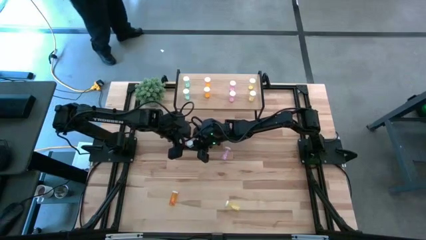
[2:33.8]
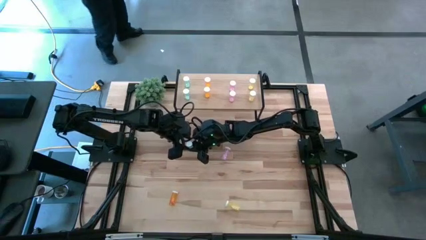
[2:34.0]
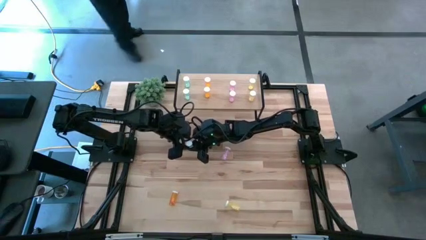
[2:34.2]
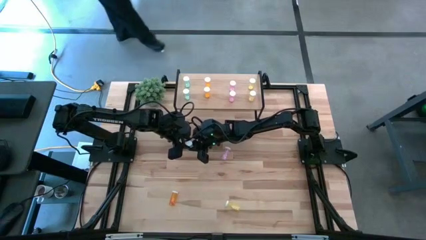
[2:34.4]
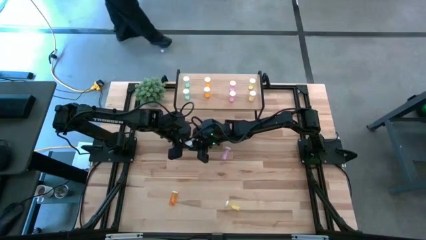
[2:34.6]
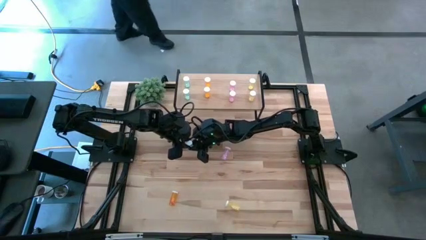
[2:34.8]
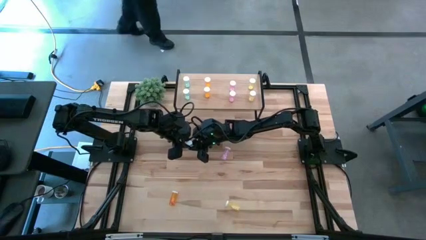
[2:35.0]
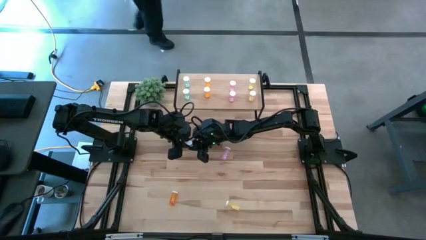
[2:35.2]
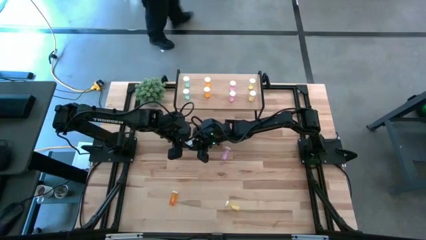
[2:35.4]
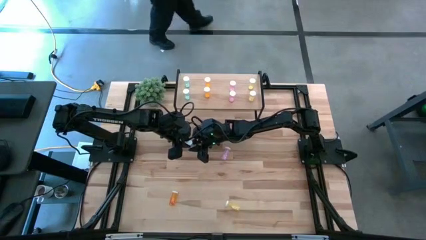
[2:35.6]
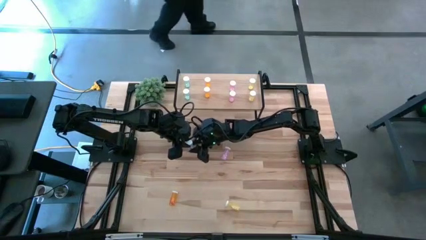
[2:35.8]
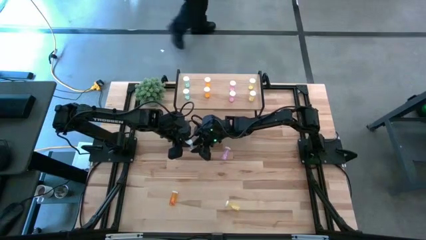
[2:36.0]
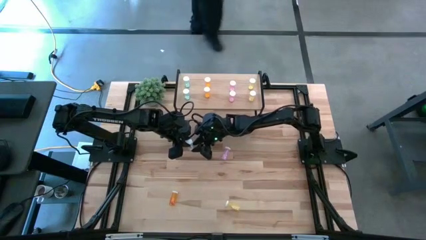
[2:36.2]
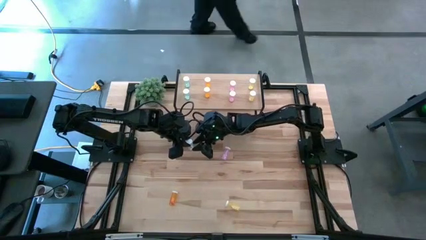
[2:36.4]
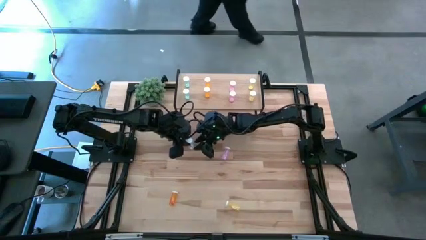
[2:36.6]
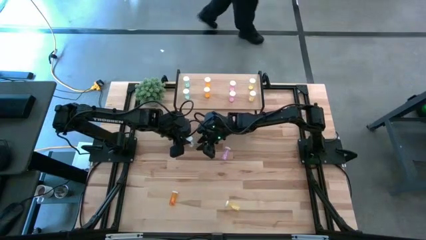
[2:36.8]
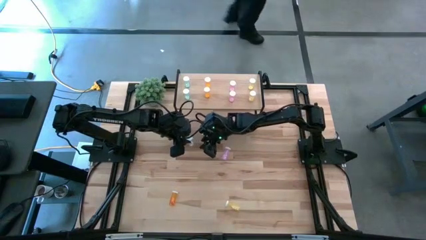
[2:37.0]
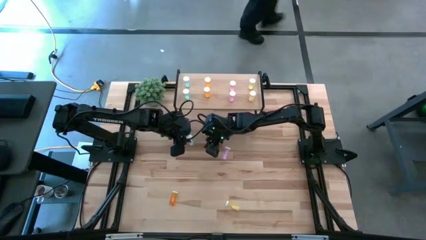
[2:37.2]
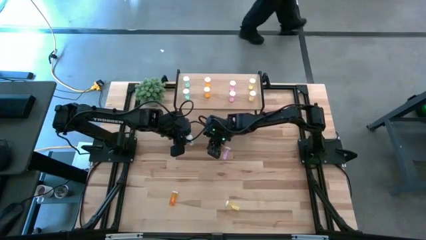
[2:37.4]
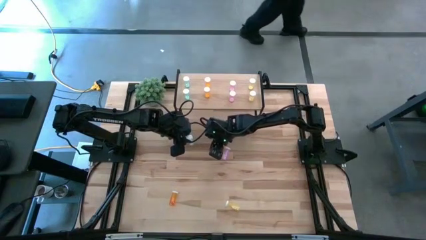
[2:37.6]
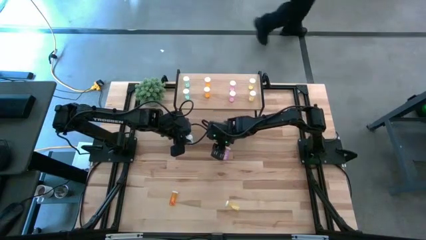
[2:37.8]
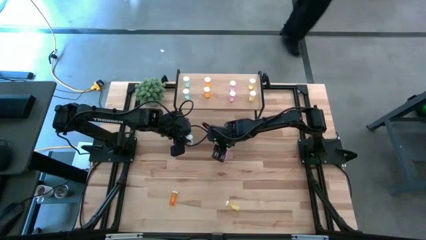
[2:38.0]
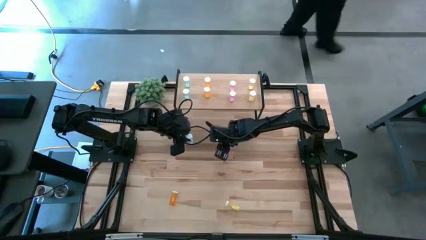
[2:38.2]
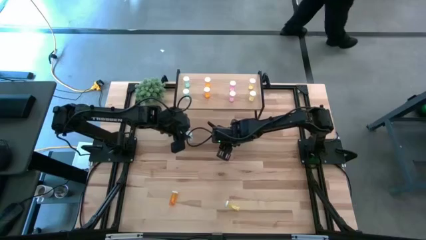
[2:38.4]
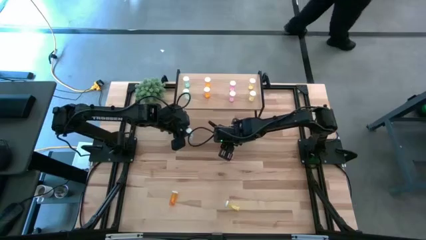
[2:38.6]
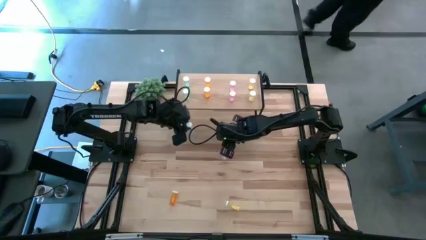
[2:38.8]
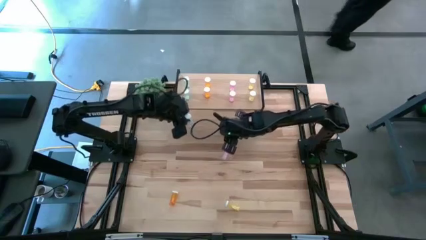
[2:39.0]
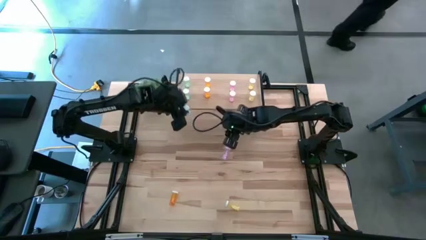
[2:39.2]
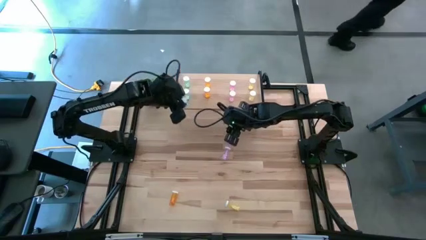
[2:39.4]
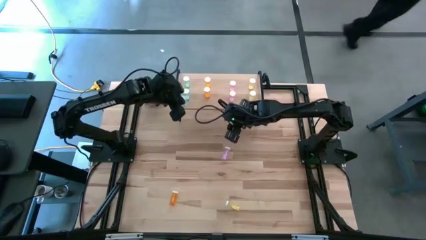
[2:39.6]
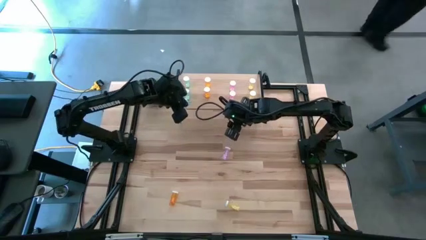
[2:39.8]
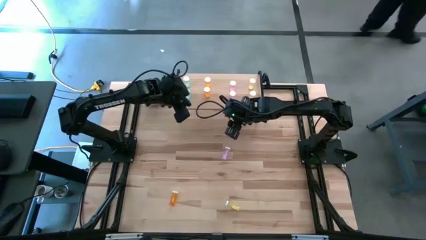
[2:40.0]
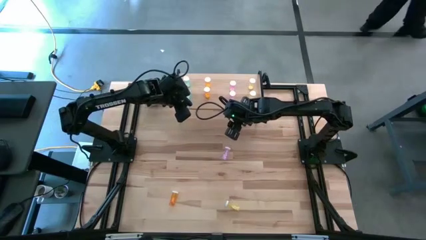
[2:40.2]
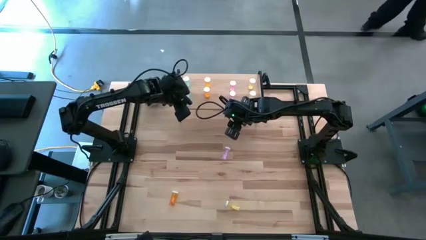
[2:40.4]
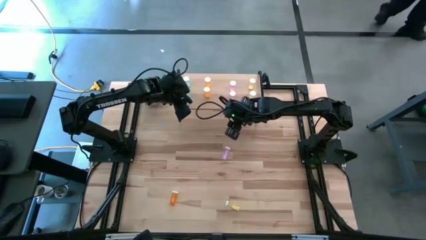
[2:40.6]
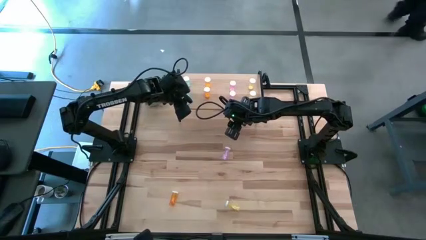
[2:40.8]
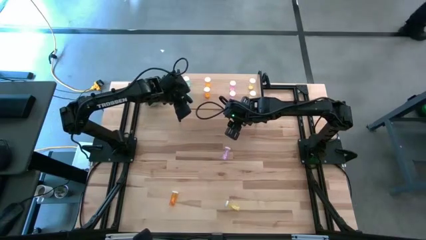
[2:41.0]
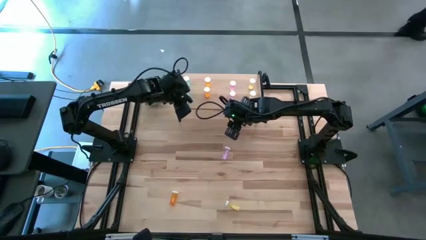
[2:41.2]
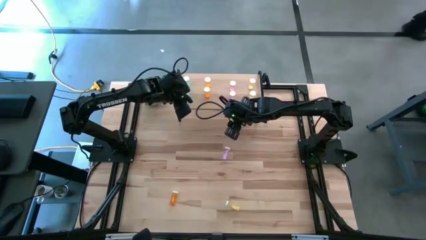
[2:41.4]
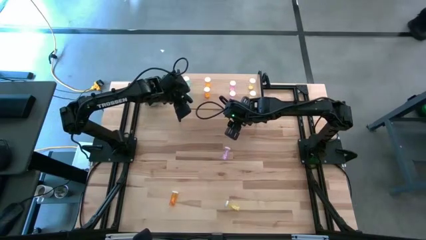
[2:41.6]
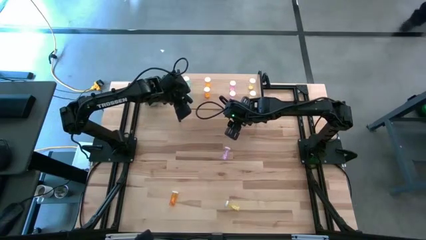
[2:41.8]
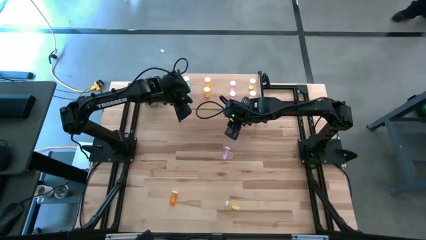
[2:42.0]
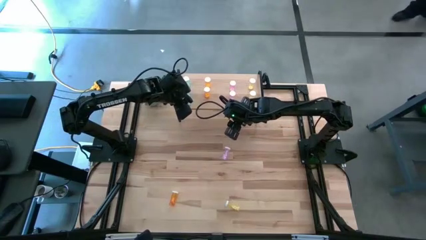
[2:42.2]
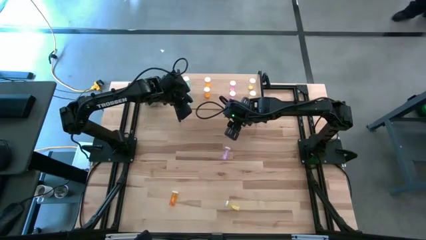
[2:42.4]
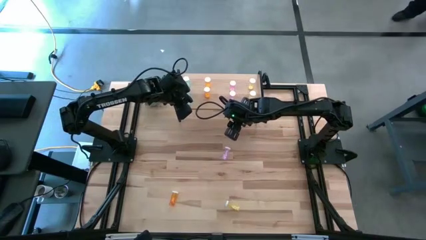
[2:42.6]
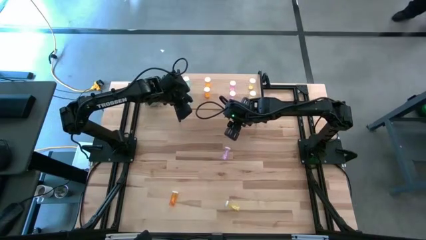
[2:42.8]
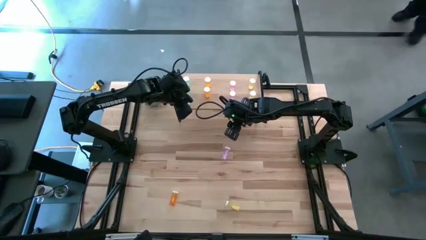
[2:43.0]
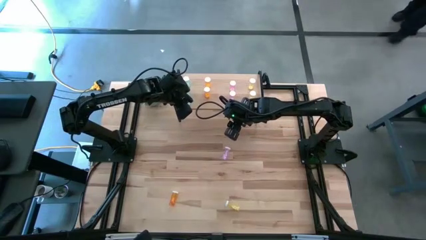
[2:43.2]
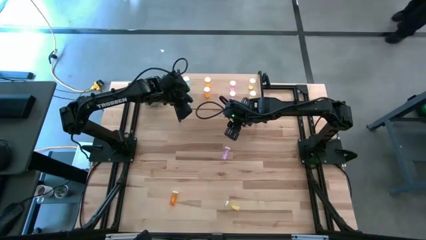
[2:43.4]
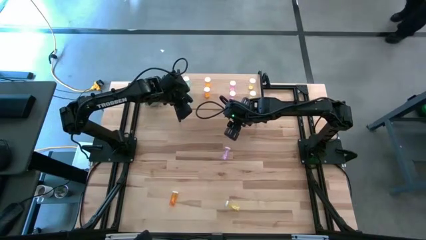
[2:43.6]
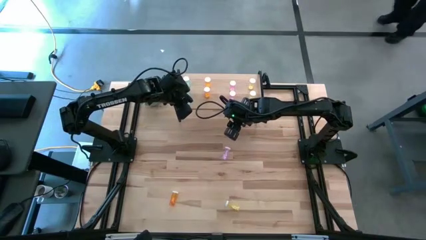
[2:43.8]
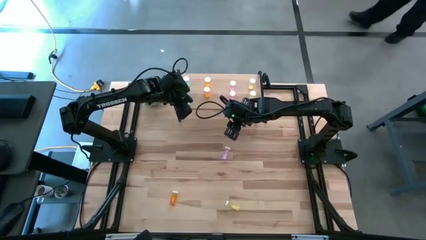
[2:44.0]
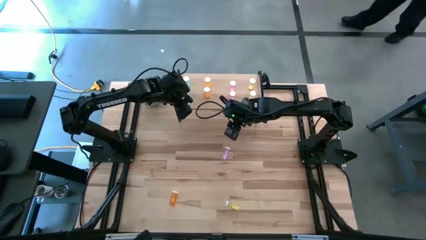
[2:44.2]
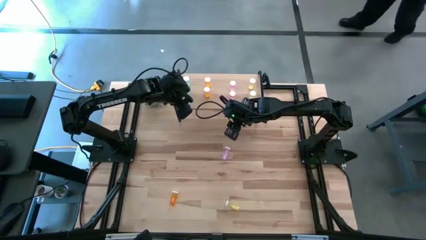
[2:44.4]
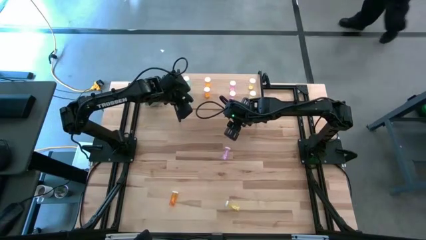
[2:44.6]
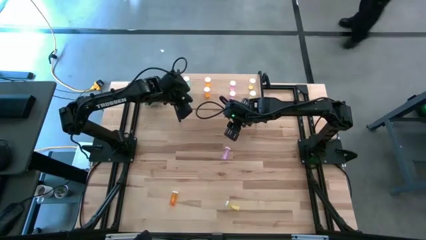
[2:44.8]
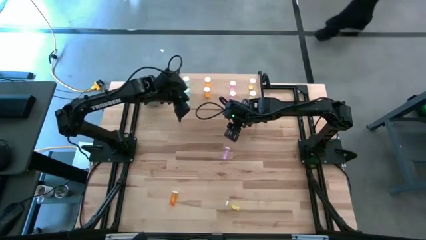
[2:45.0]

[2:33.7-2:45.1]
Task: Pick and place medicine bottles onto shelf by color
Put the blue pill bottle on the shelf aligned with the blue pill bottle

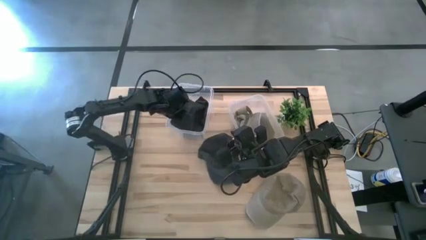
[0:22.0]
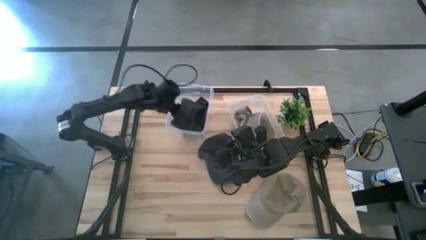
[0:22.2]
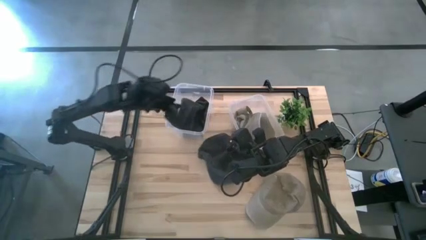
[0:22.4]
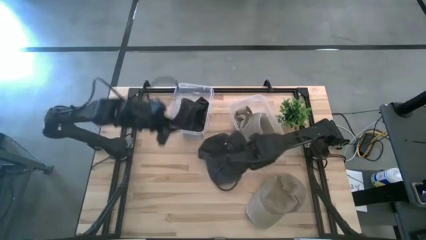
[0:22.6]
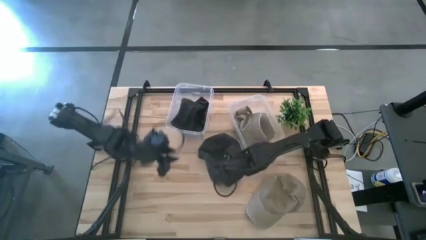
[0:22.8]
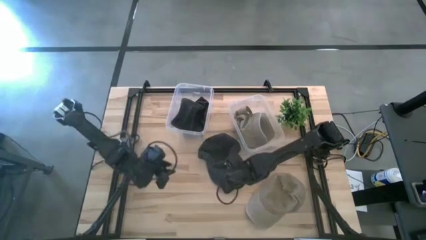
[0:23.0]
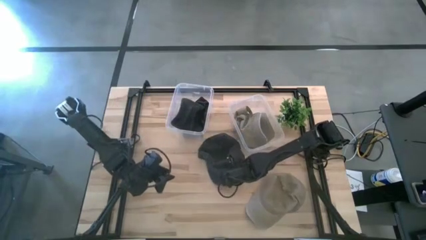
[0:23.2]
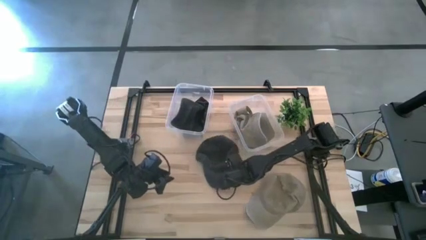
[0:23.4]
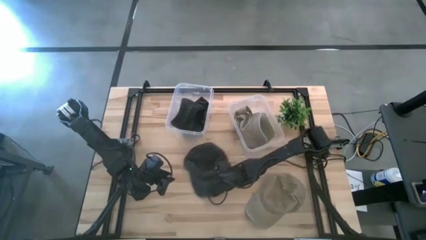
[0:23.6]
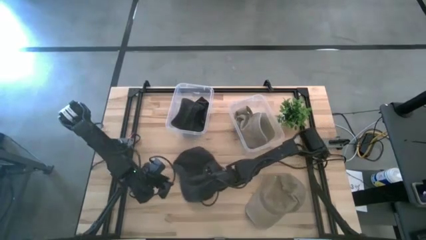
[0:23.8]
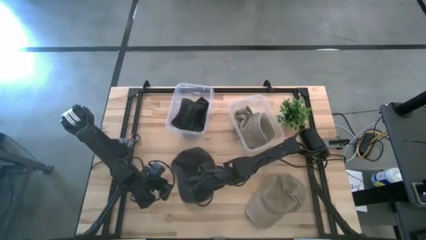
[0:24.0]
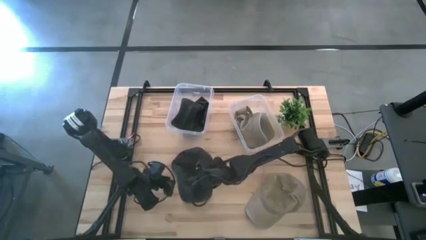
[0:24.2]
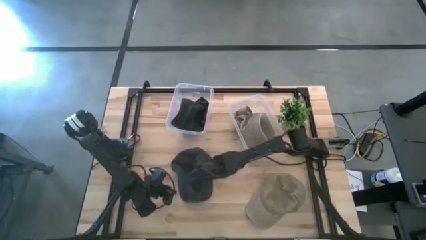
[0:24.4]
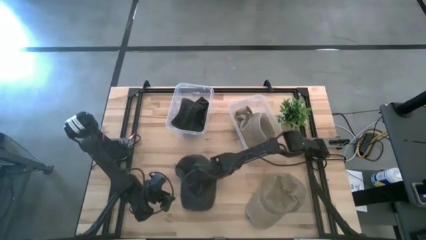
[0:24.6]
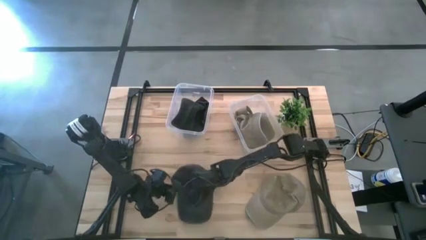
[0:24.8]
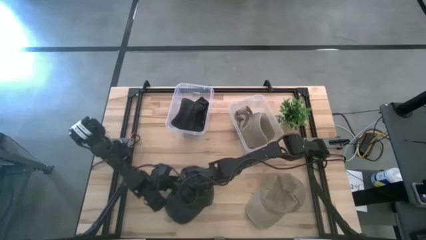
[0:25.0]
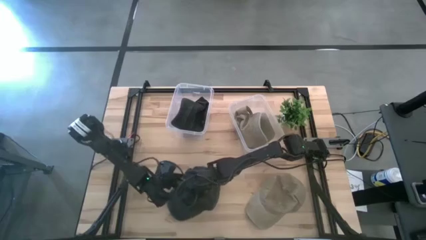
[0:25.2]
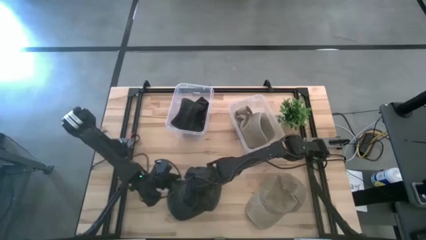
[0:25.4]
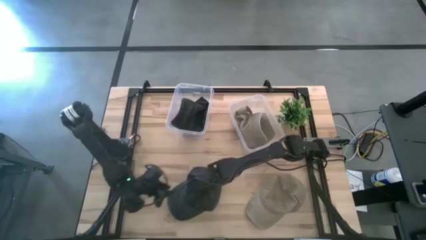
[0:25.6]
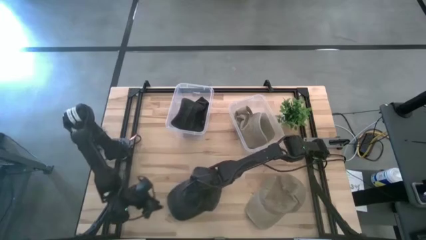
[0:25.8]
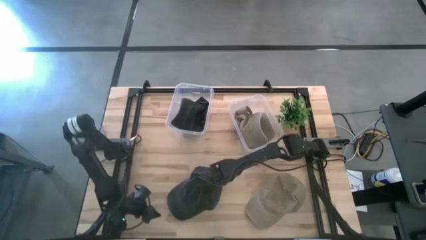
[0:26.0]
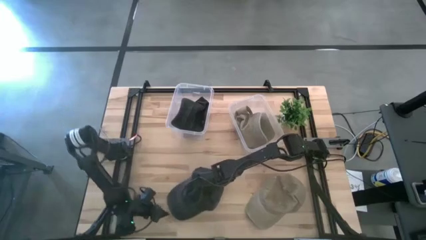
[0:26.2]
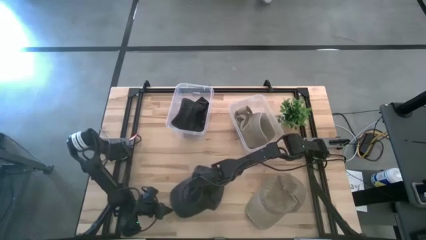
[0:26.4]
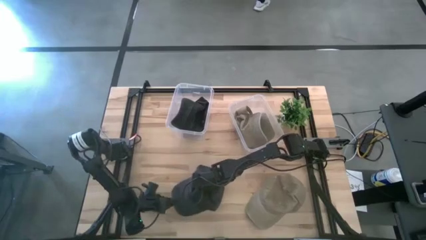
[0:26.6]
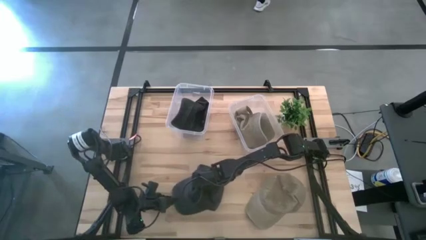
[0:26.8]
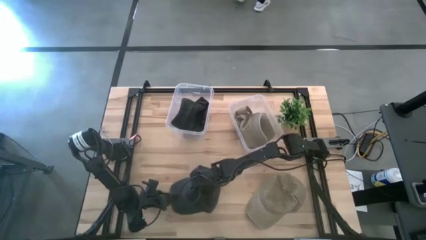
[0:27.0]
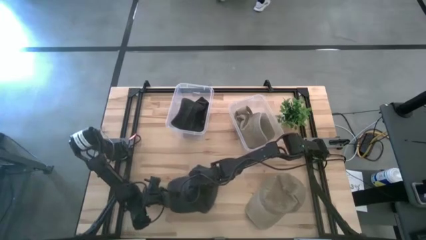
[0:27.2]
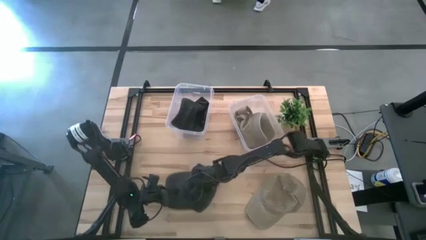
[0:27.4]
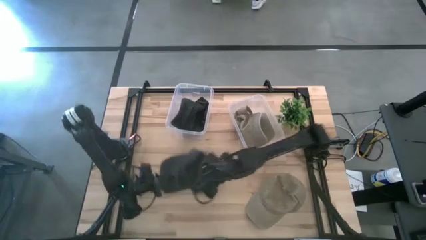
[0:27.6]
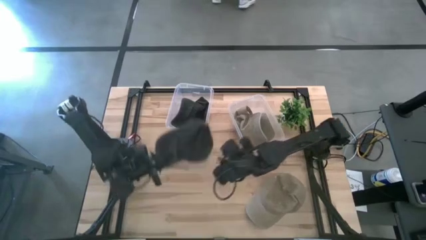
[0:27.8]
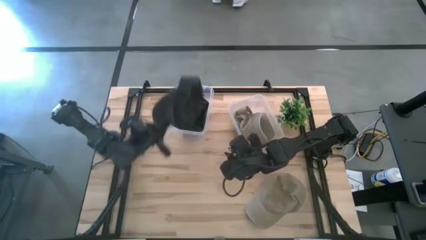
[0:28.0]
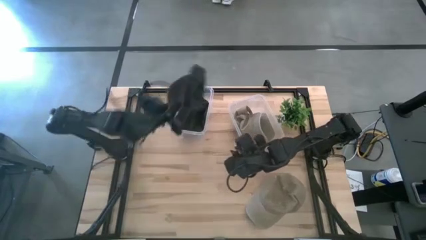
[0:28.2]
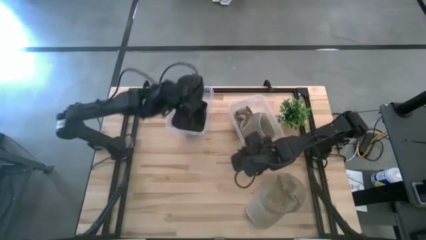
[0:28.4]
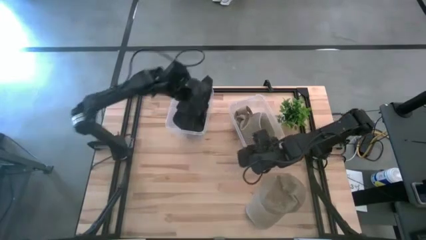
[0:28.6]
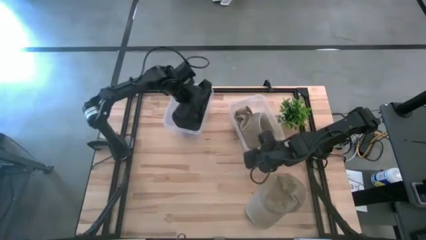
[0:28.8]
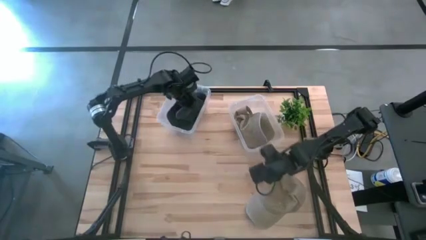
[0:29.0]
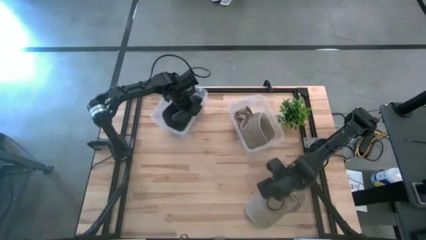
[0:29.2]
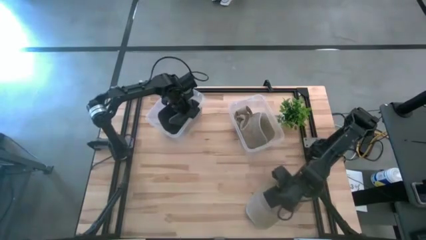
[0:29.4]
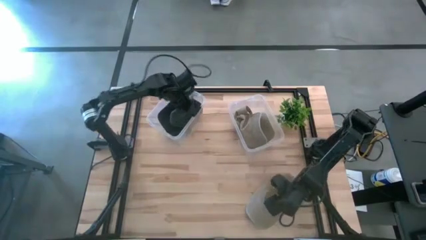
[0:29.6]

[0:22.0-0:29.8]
Task: Pick & Place hat
Put the black cap into the left transparent bin
